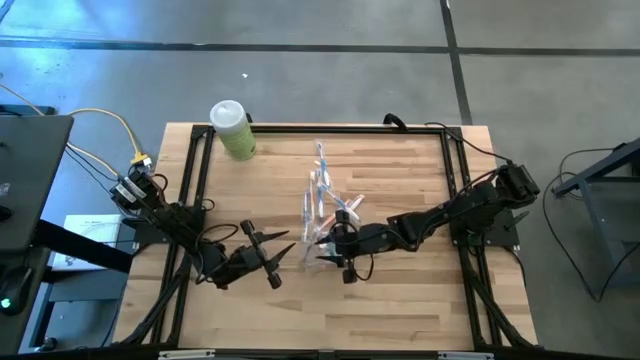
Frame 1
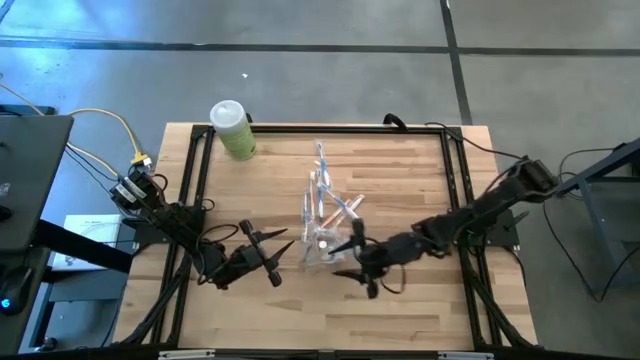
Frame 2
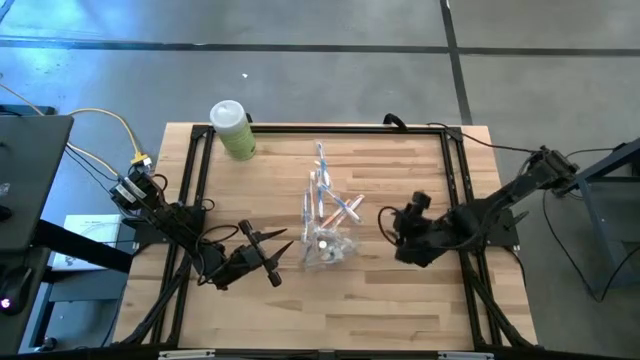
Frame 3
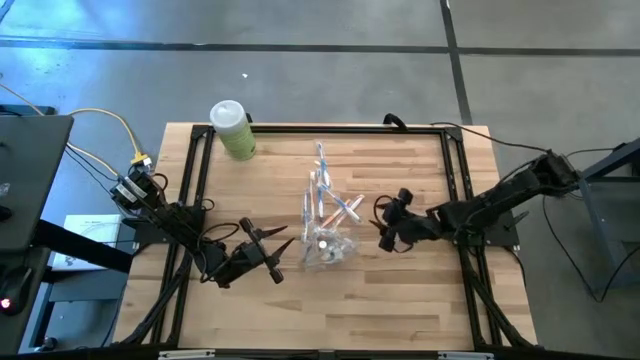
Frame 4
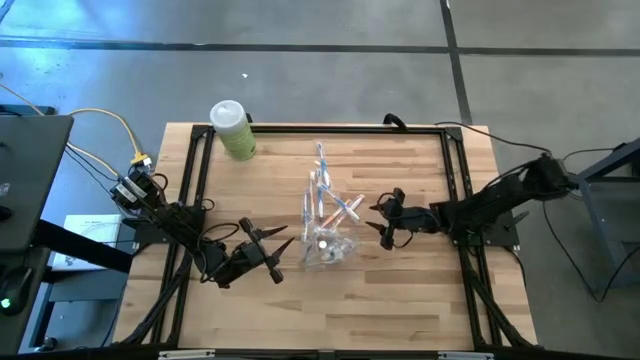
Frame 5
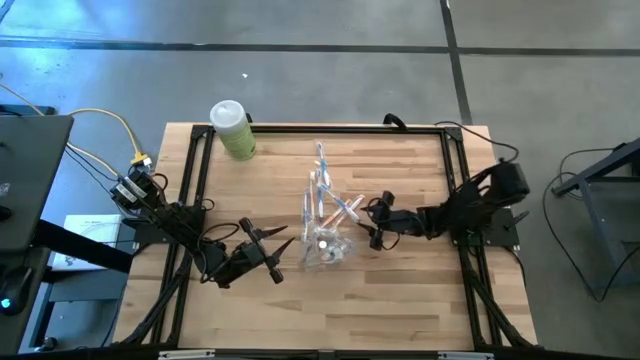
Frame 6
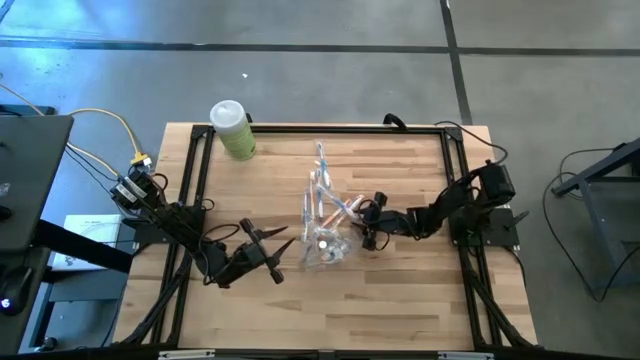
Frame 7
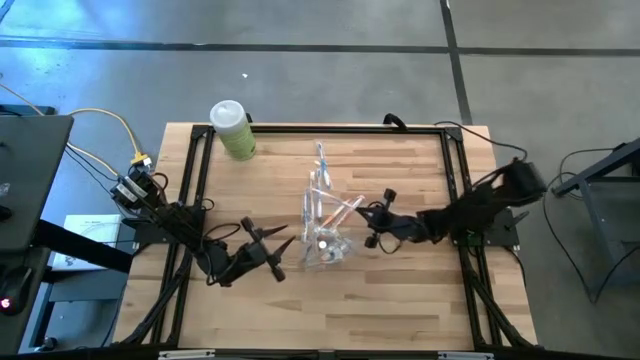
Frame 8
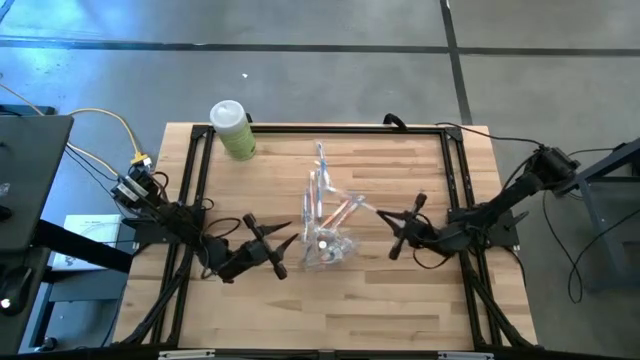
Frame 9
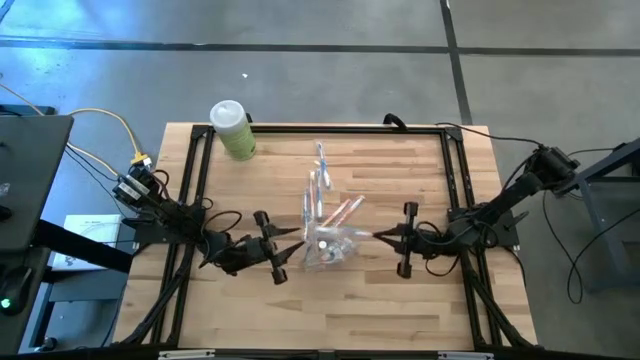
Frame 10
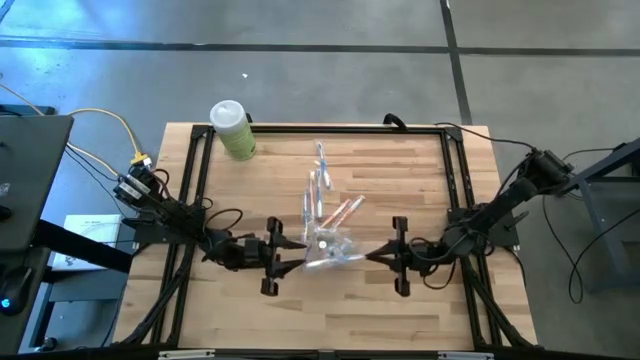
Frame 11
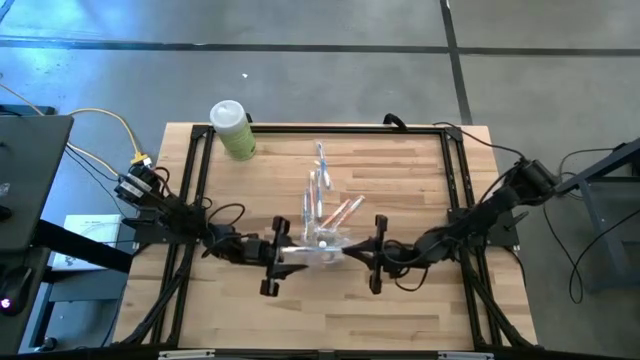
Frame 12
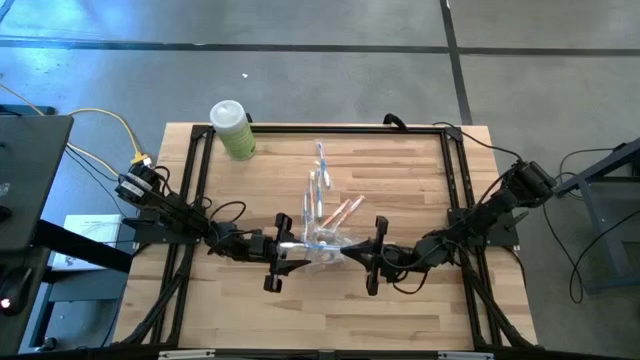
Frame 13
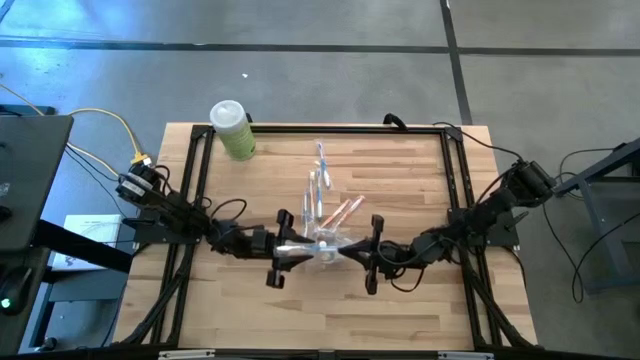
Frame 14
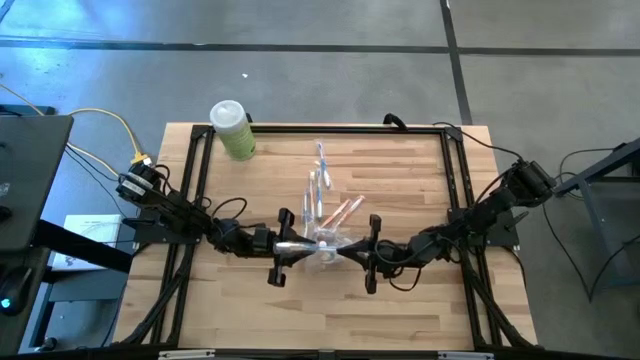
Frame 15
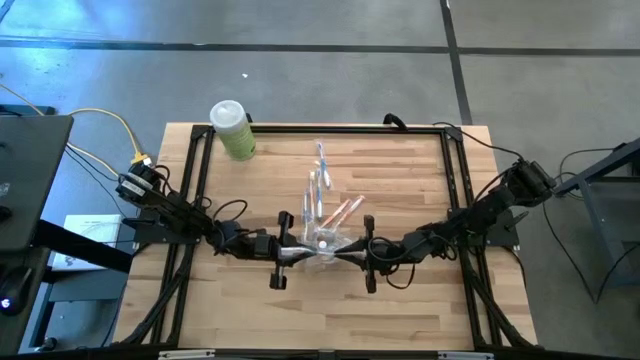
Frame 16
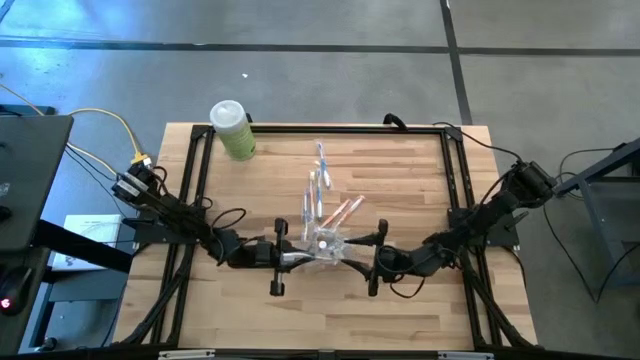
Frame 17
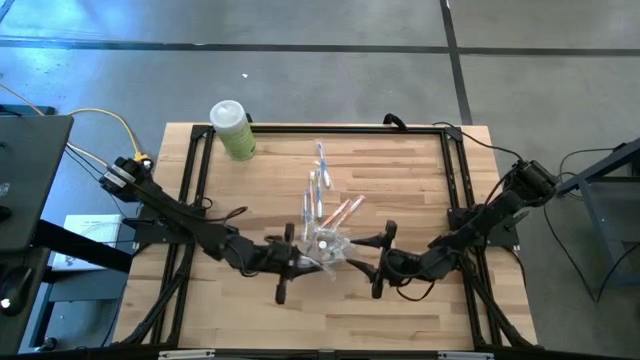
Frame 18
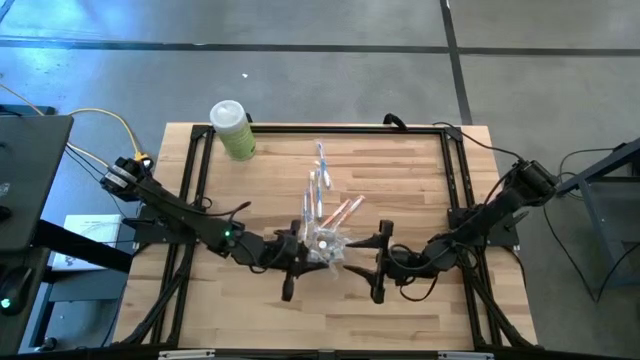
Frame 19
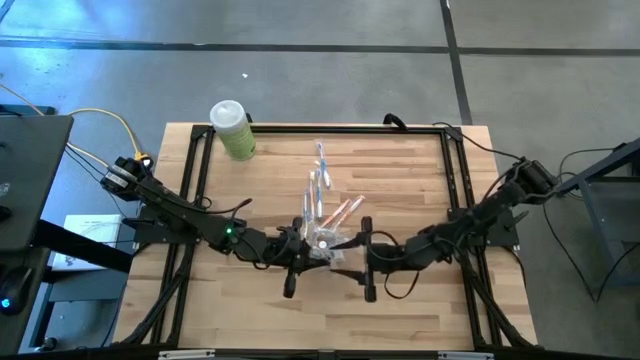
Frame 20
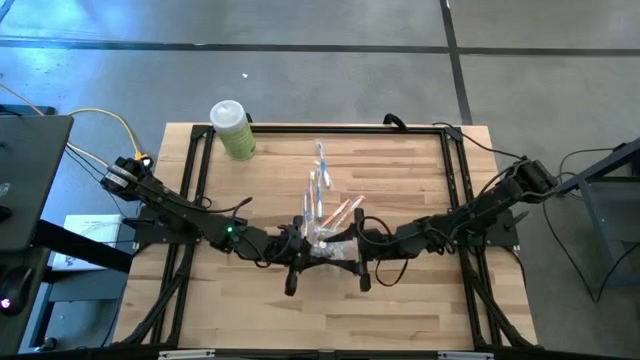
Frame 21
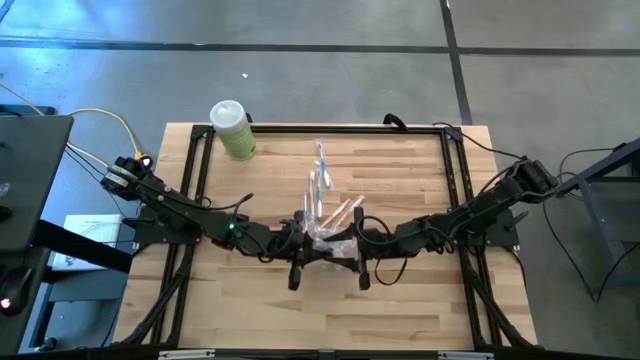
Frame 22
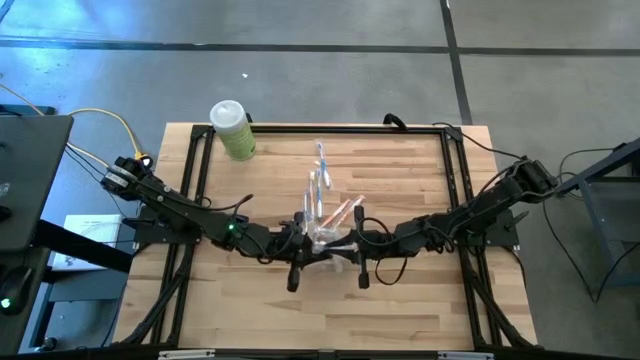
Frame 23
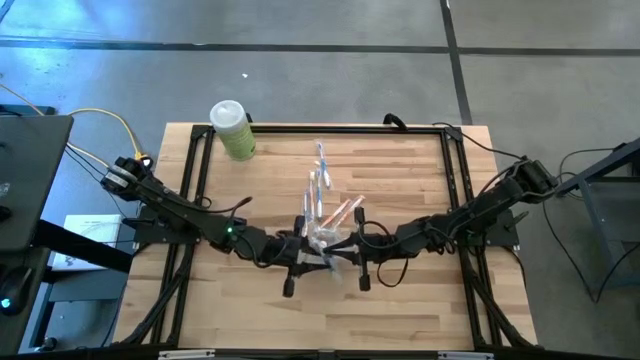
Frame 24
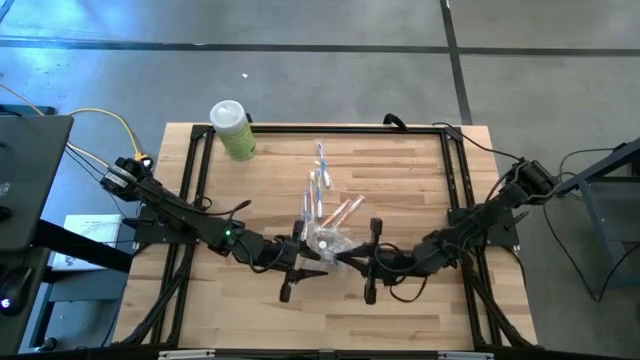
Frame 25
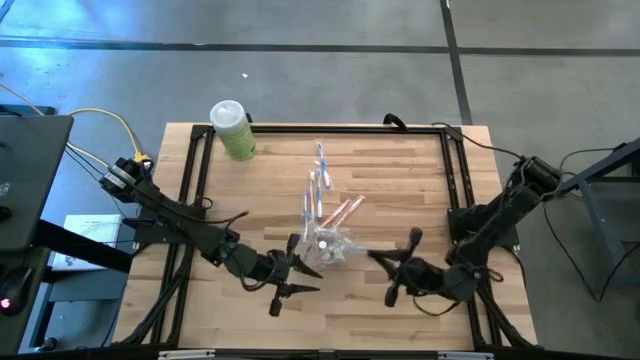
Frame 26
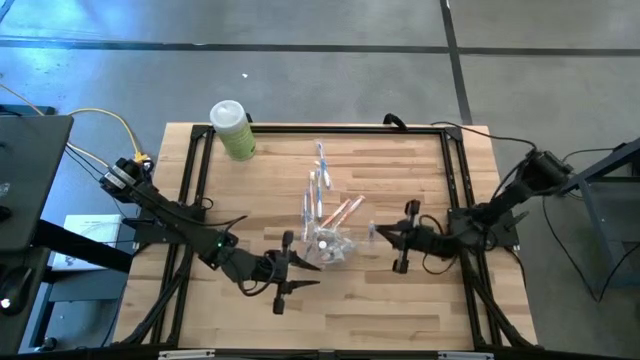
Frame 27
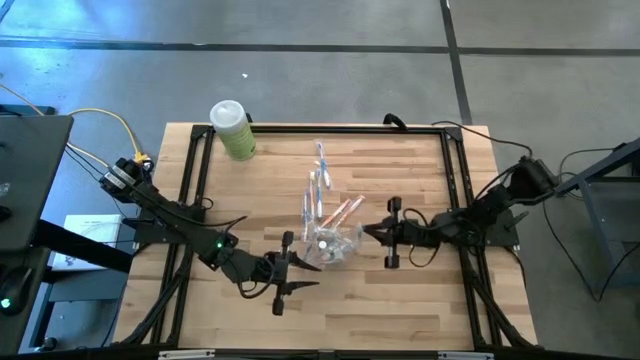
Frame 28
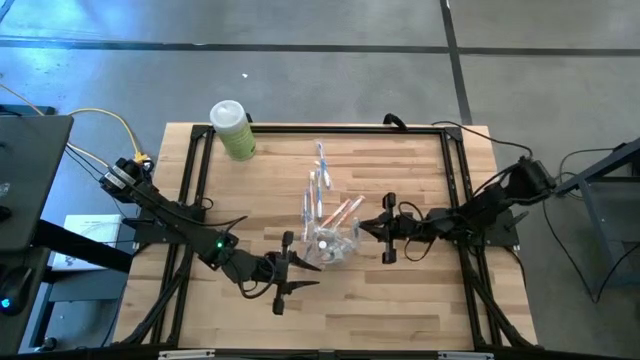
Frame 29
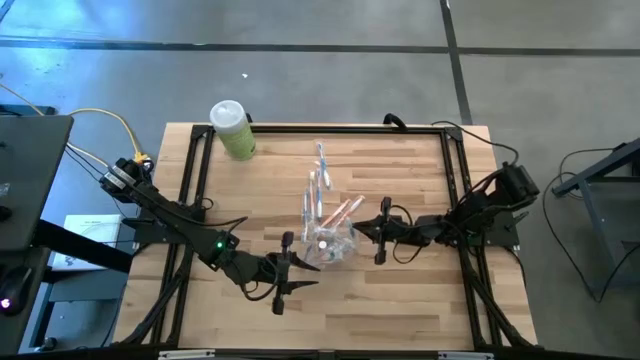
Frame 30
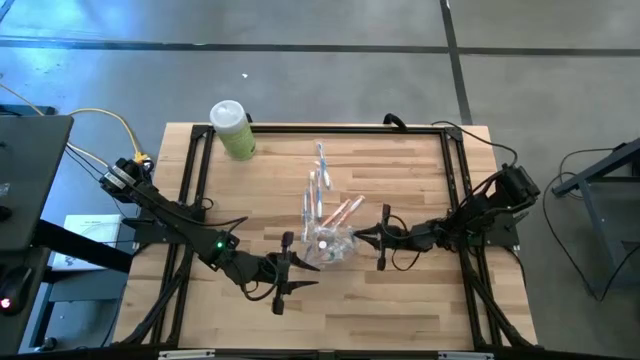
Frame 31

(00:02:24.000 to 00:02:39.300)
Task: Pick & Place toothbrushing station
Put the blue toothbrush into the transparent organizer

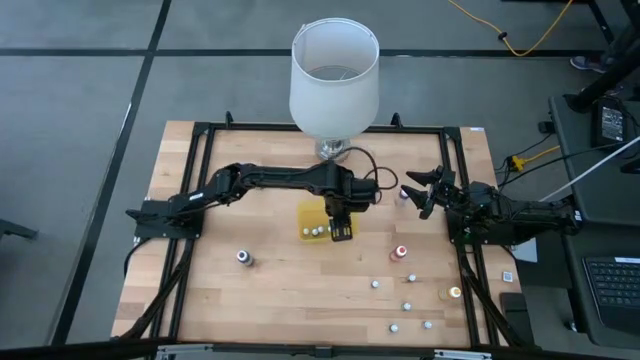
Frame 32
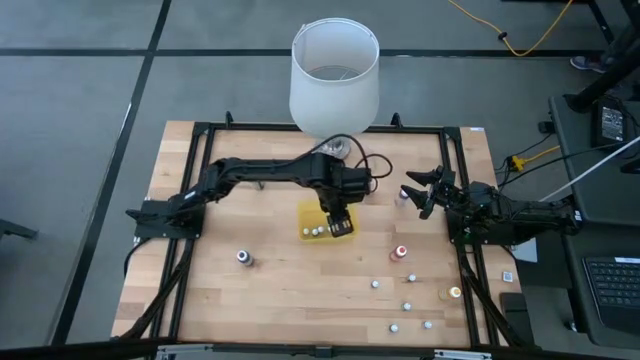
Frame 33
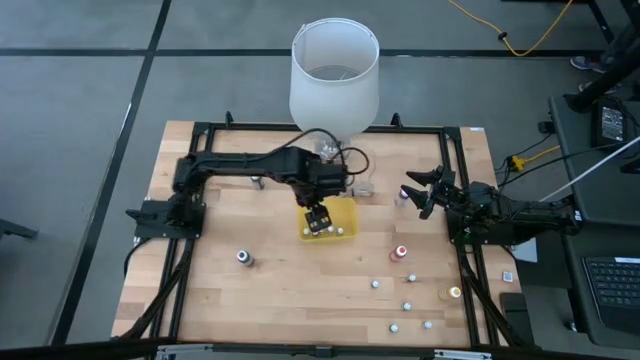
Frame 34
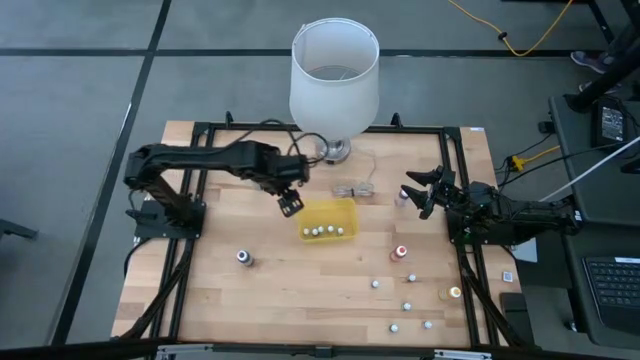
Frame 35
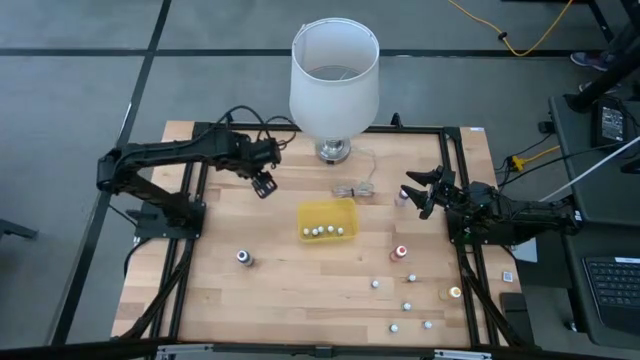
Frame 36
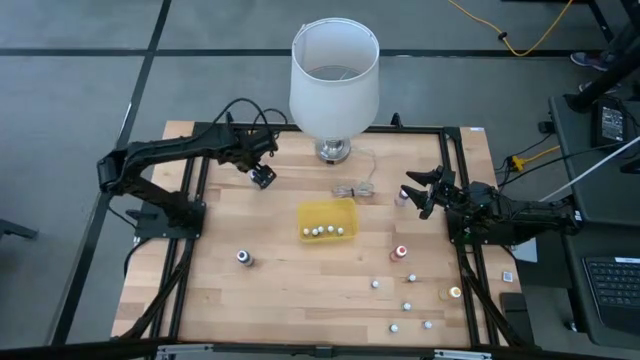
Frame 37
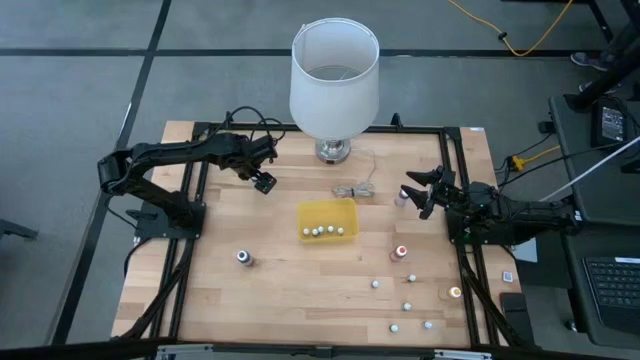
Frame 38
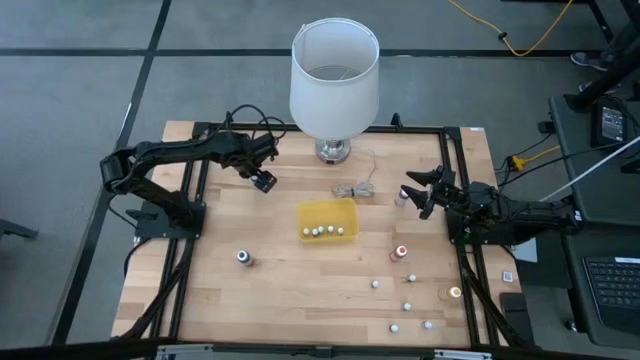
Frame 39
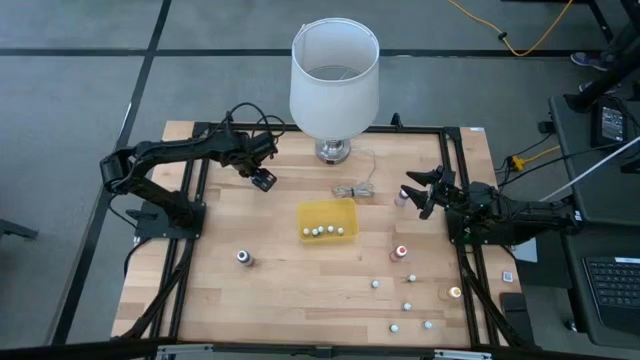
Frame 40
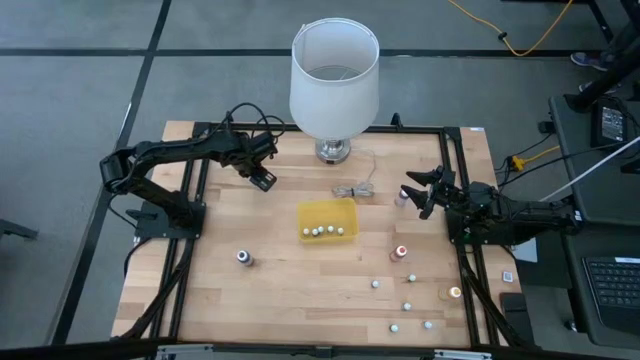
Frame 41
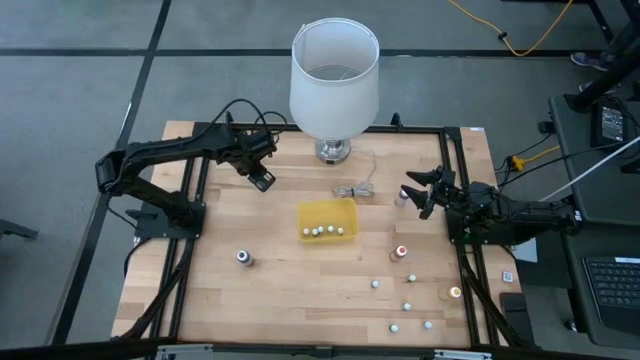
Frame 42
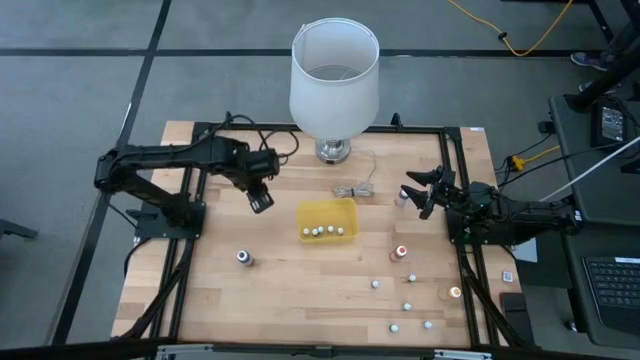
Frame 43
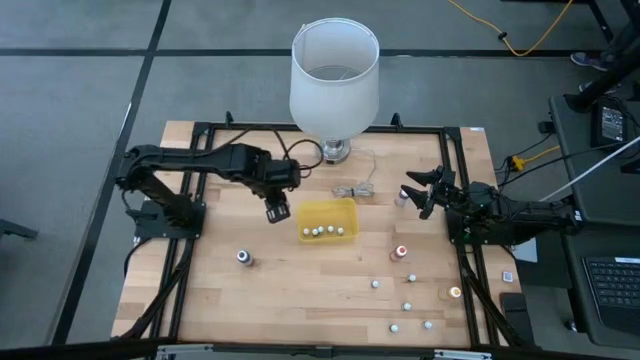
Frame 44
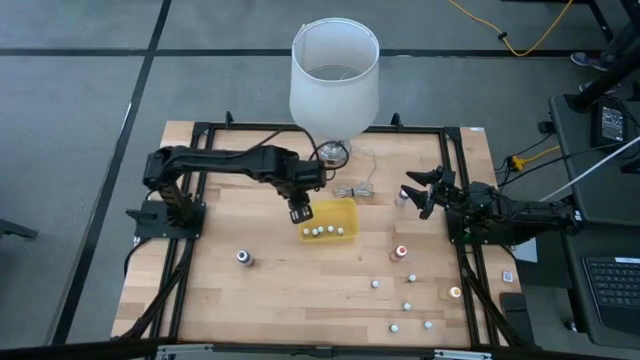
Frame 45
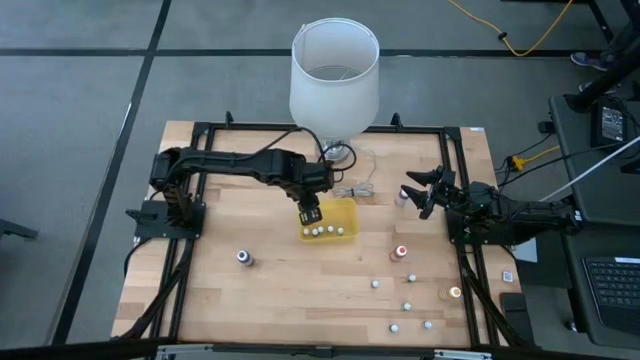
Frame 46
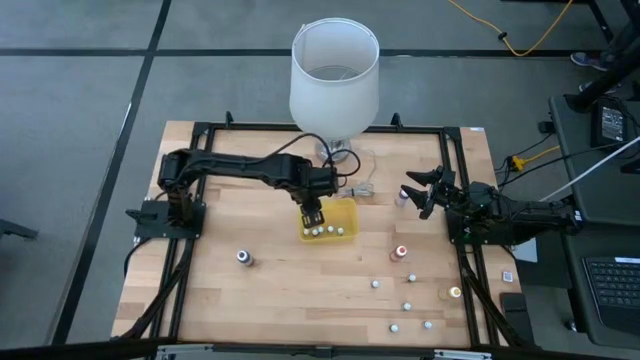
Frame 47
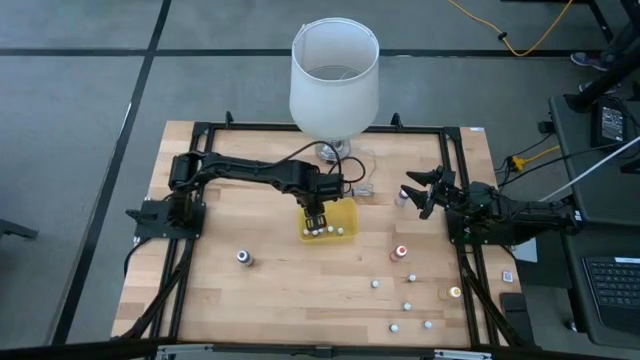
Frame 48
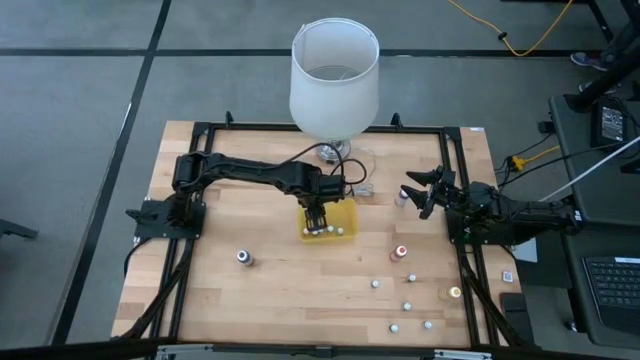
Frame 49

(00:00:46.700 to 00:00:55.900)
Task: Pick & Place food coloring
Put the large blue food coloring bottle into the yellow bin
